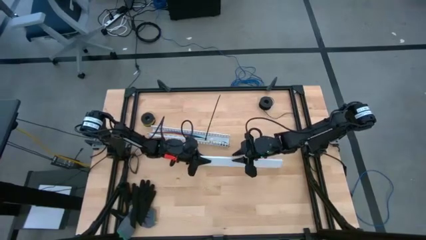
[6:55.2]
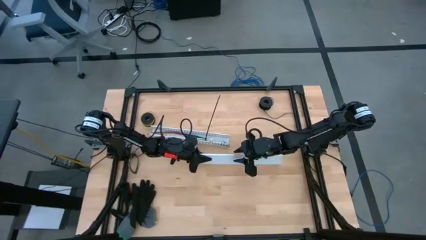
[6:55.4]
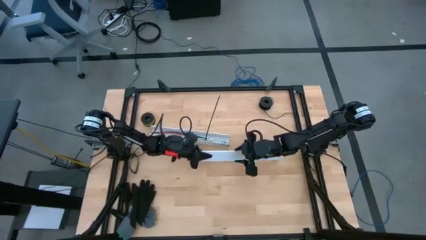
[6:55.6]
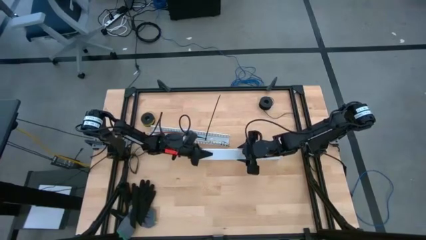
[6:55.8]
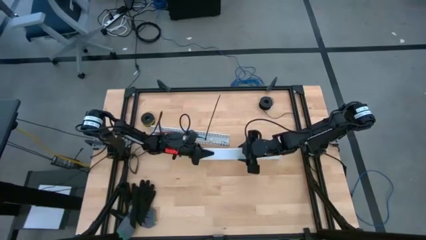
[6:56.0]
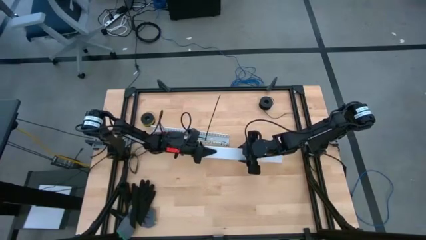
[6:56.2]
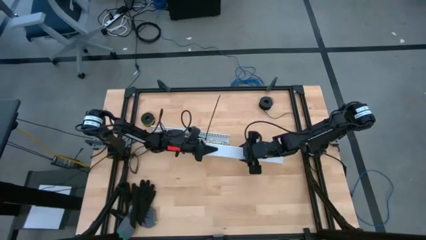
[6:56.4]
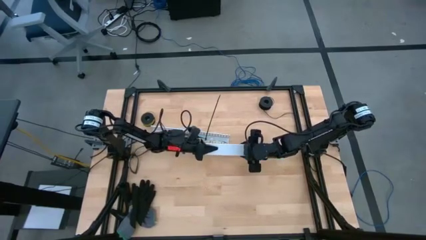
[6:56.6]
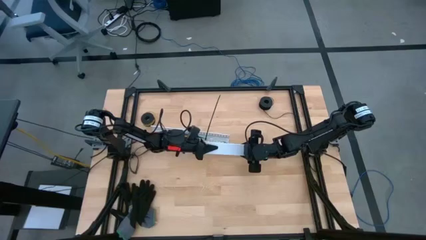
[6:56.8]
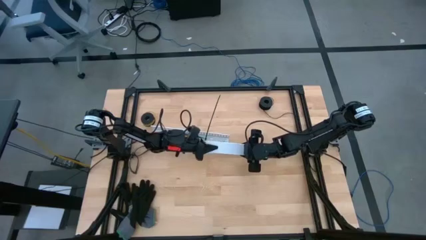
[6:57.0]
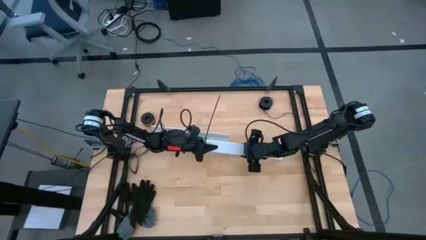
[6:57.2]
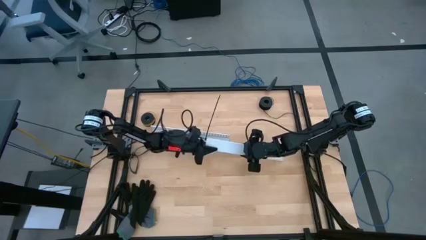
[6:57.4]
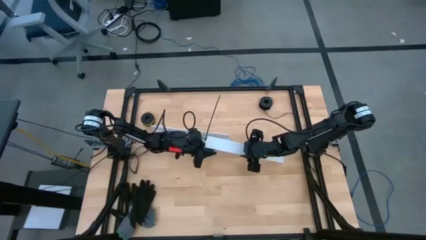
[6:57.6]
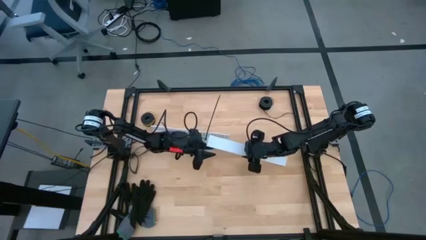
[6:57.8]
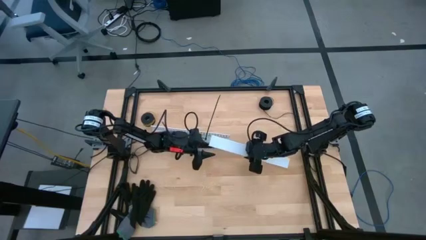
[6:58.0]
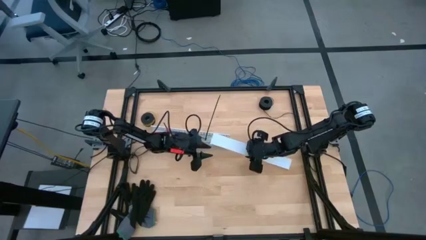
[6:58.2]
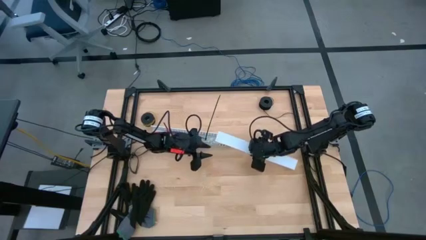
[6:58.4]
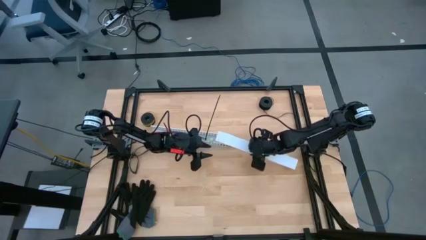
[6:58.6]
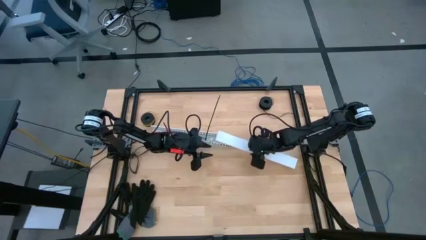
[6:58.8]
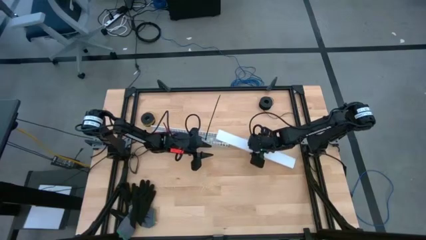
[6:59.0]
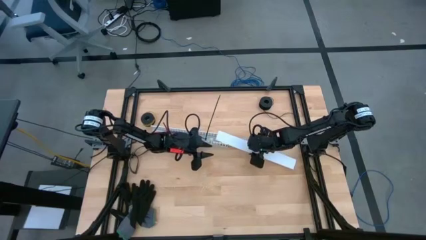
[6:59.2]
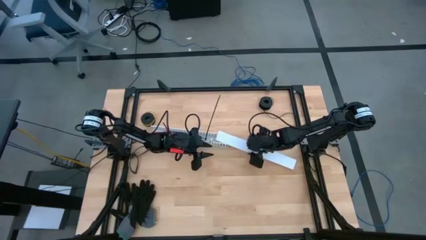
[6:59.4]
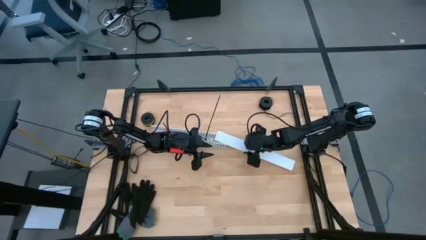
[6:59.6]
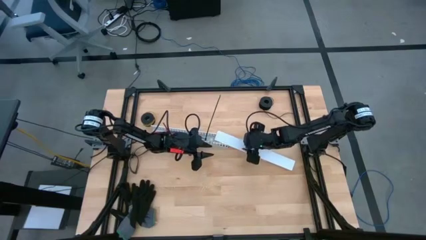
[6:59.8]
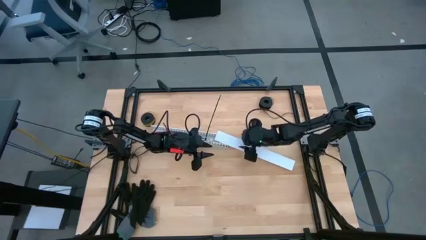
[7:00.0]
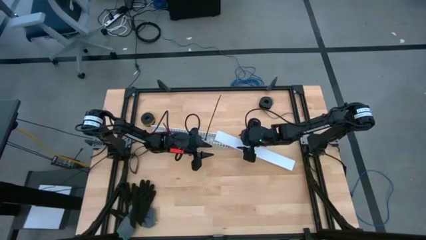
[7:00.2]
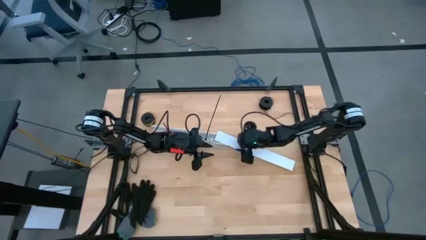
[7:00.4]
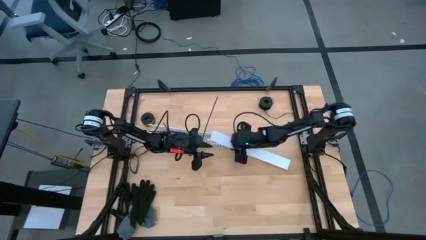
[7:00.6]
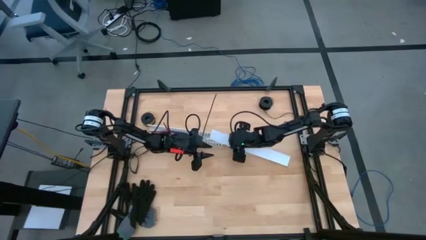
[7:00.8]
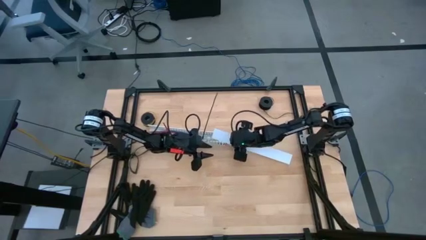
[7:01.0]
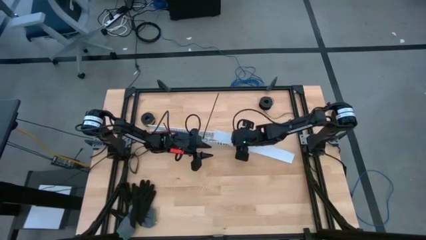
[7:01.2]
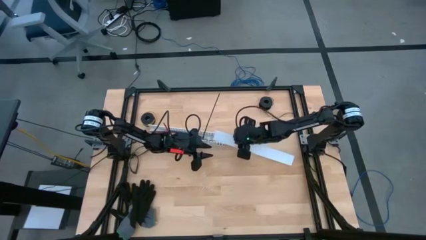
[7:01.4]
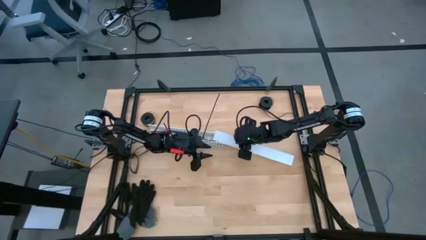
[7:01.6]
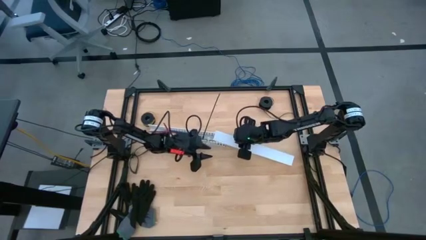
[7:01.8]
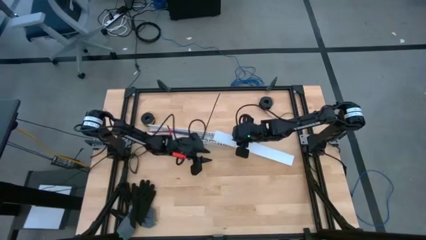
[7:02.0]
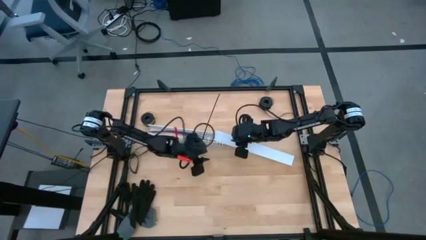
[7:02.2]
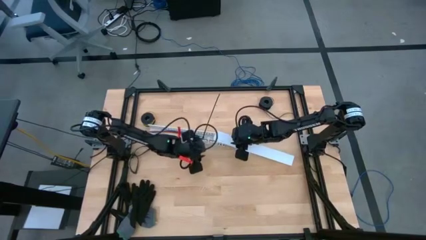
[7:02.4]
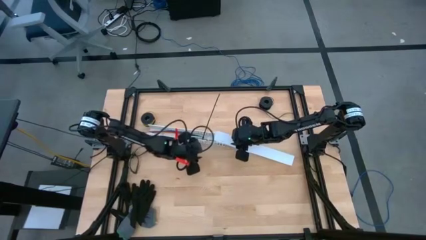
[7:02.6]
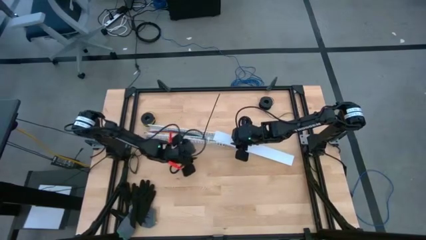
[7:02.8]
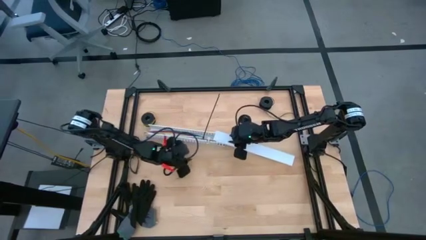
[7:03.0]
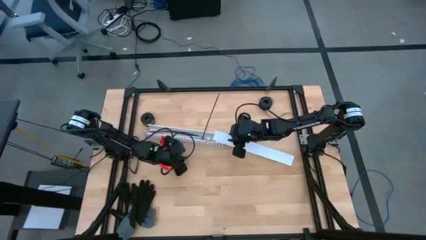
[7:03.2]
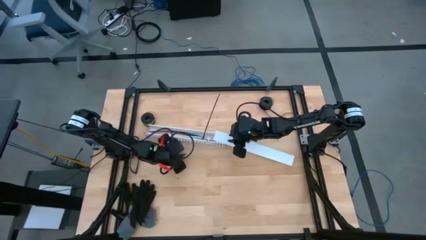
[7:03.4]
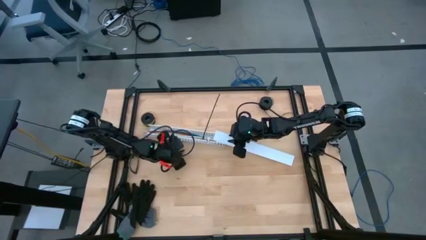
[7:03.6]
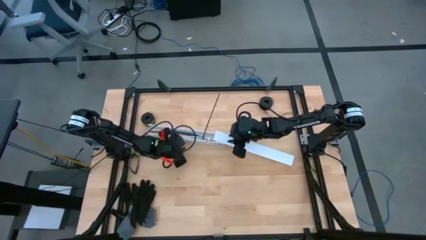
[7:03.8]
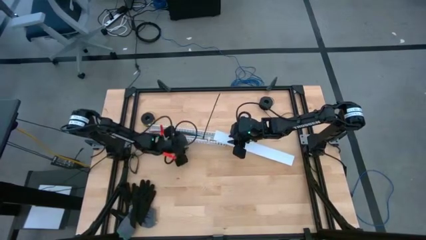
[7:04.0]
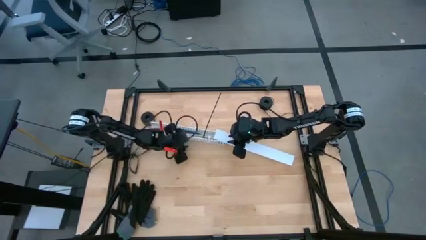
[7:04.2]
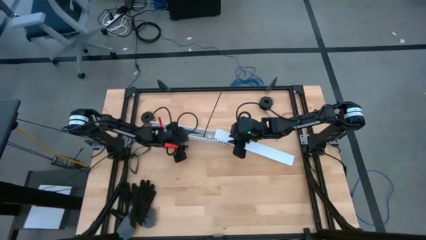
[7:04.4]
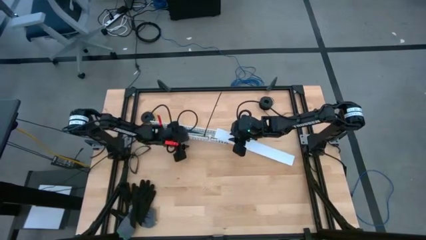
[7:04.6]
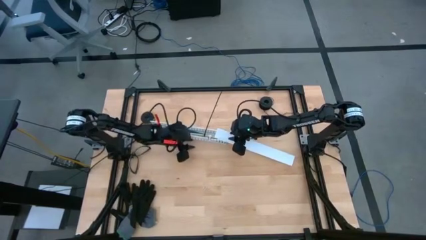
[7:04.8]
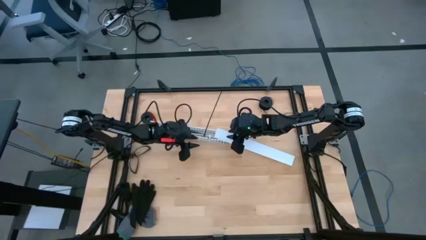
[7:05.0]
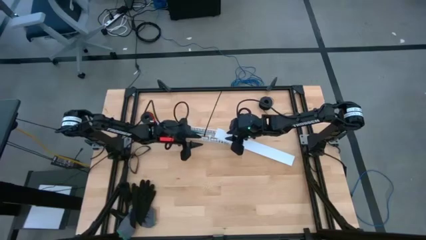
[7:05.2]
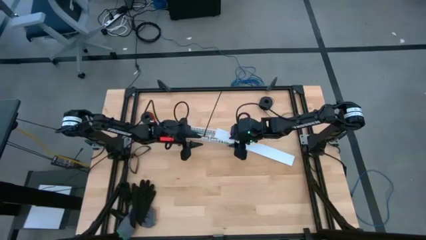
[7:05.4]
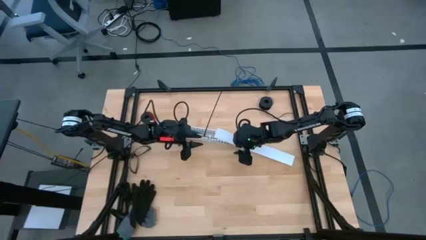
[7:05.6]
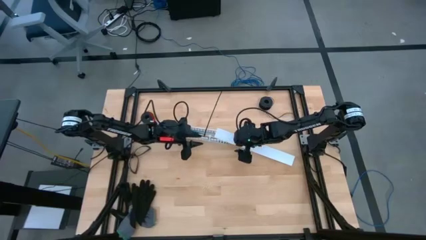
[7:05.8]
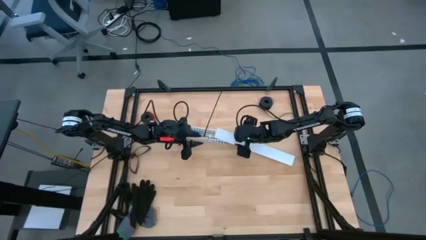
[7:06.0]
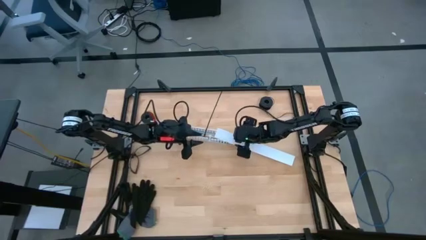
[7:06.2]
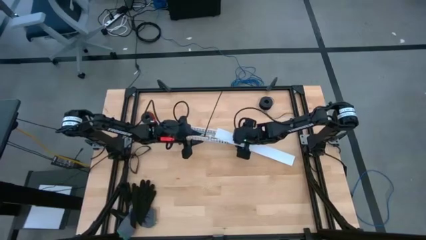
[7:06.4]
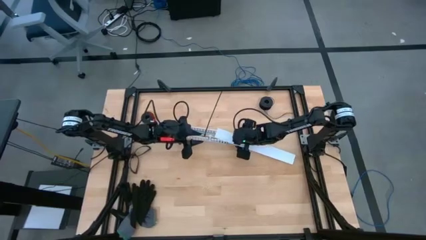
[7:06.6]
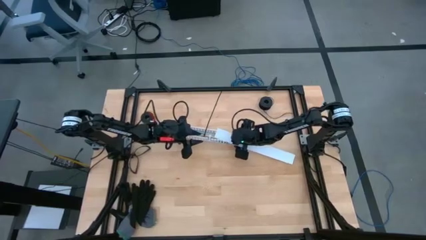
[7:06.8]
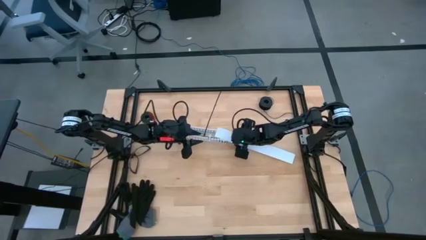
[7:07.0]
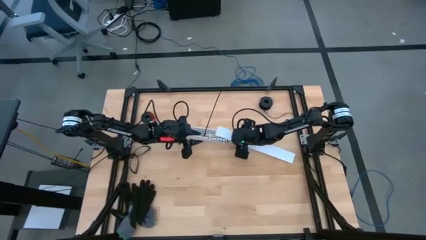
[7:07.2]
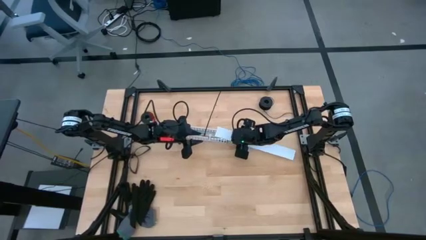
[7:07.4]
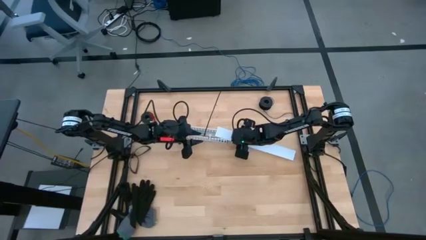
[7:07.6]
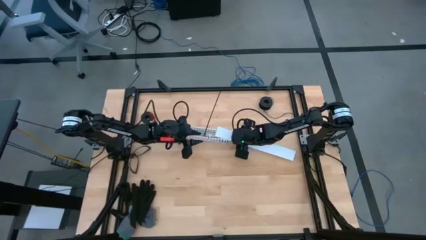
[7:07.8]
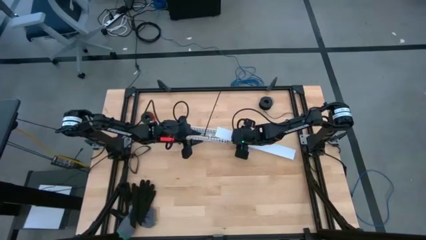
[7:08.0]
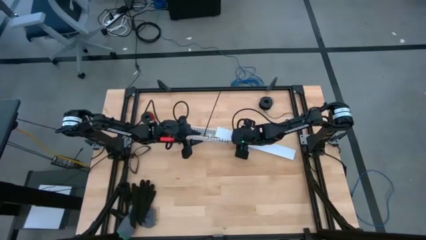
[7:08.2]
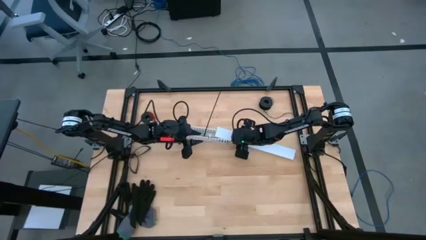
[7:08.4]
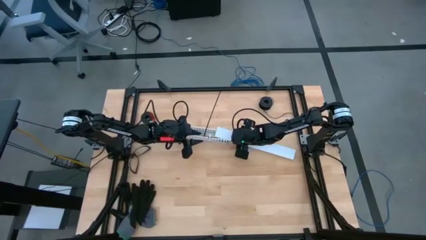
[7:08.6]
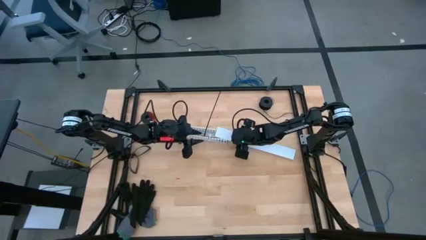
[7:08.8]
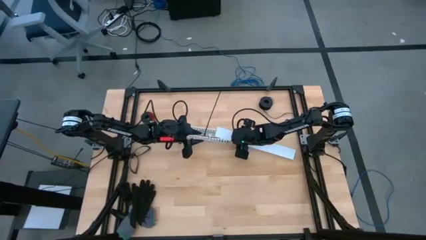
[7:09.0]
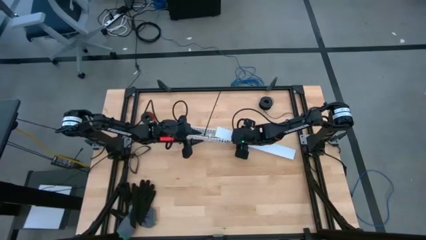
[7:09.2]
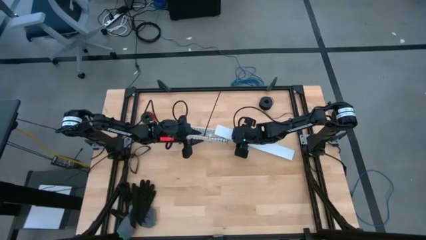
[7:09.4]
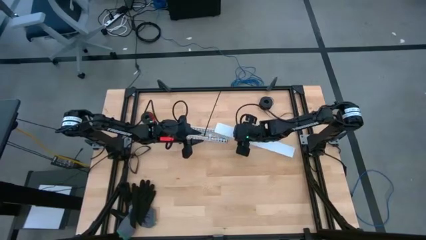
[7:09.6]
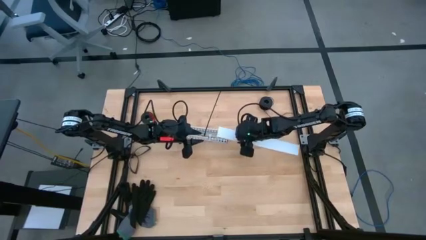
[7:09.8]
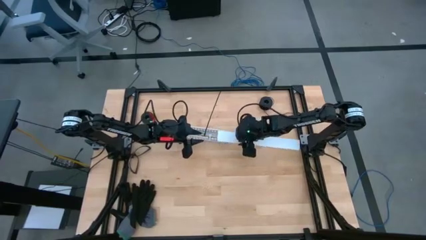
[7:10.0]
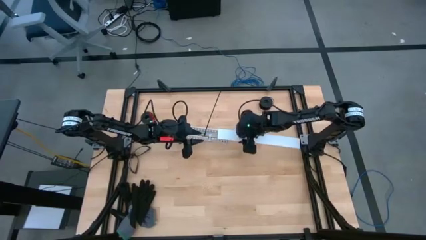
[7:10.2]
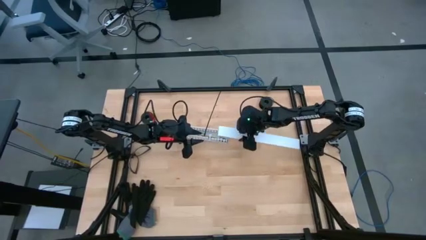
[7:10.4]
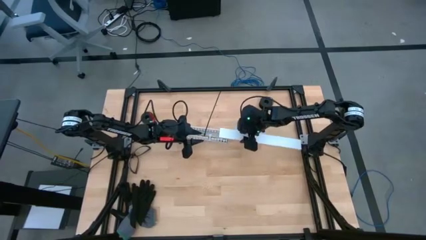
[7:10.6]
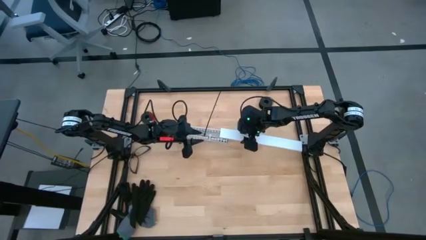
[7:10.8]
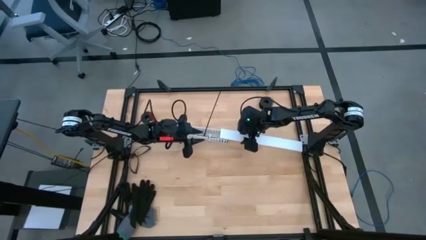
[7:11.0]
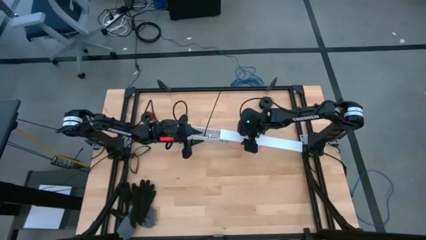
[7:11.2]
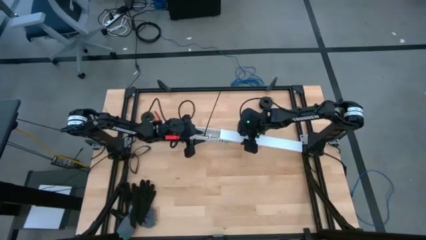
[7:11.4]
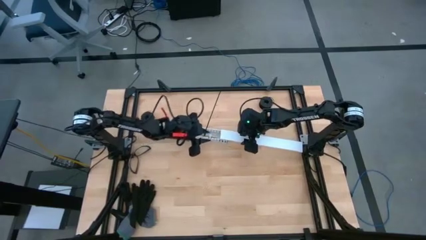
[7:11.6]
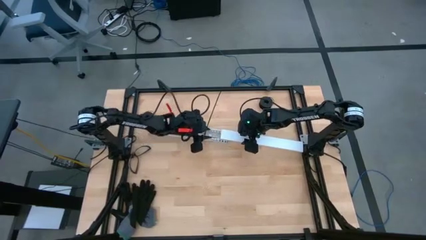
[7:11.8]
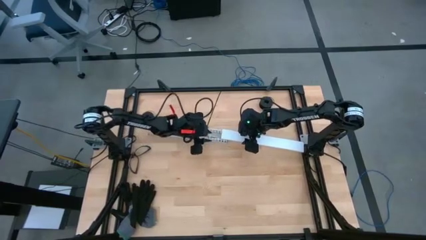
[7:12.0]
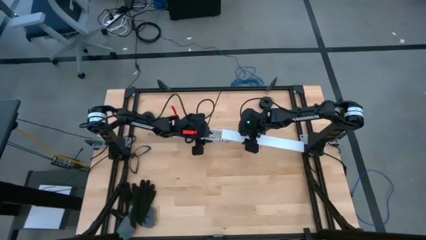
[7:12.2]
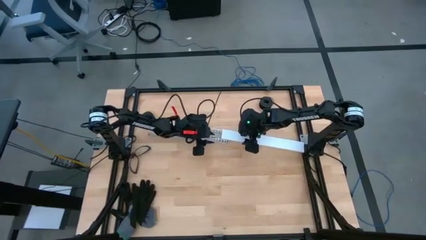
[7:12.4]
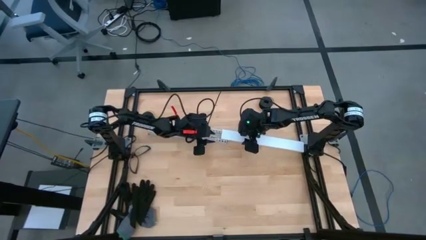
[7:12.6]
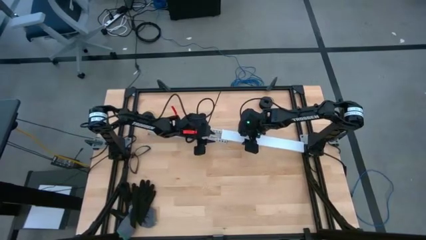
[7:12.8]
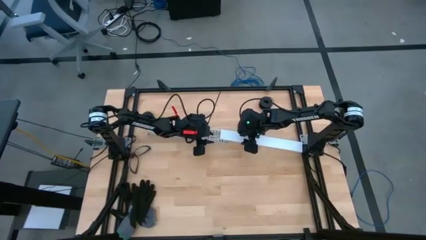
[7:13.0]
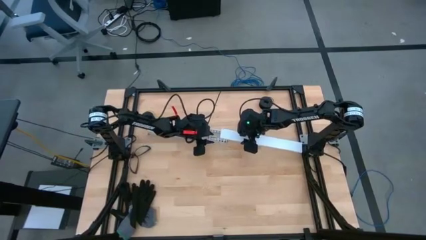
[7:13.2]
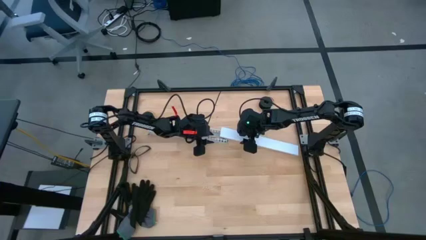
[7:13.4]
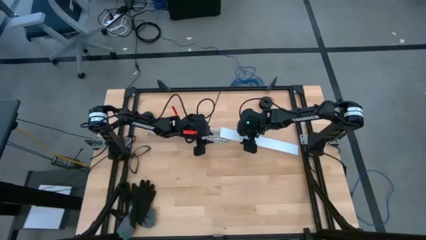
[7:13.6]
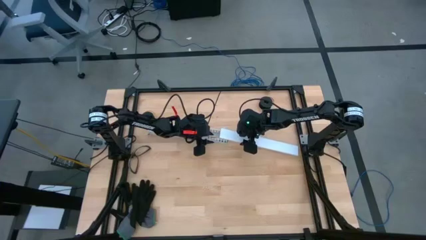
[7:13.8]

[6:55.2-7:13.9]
Task: Ziptie cables
Close the white cable duct
